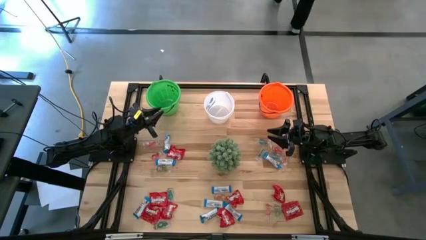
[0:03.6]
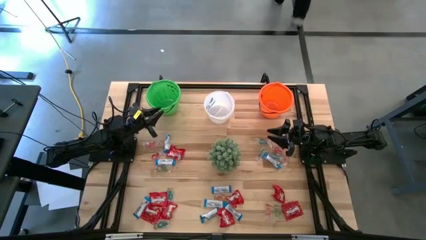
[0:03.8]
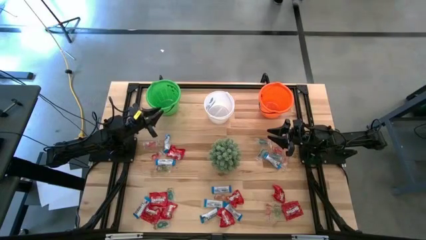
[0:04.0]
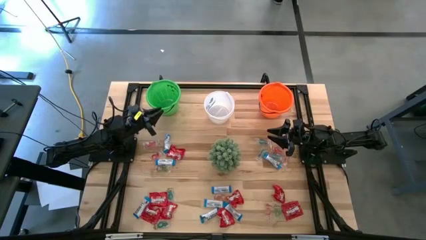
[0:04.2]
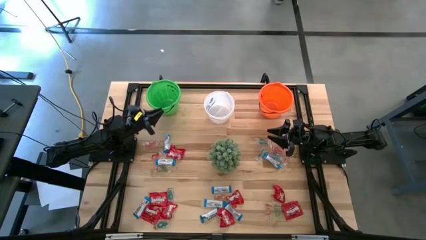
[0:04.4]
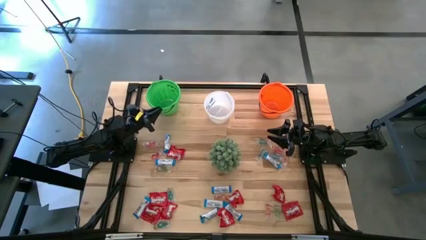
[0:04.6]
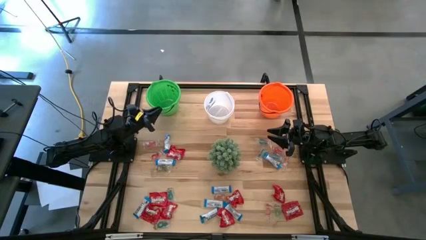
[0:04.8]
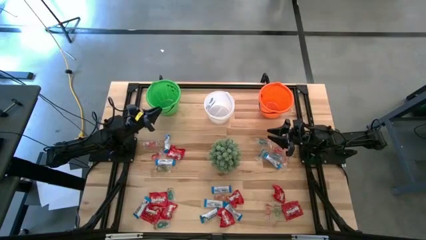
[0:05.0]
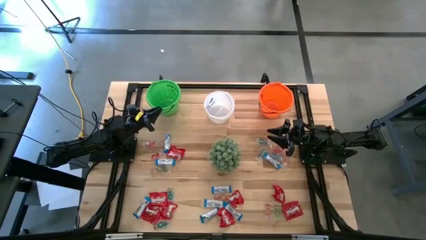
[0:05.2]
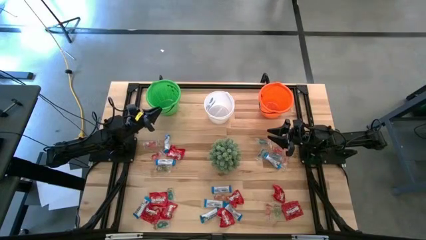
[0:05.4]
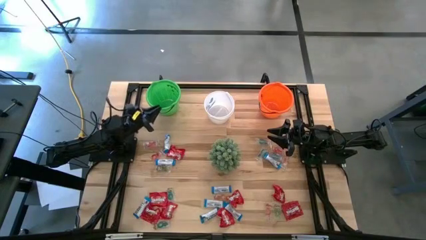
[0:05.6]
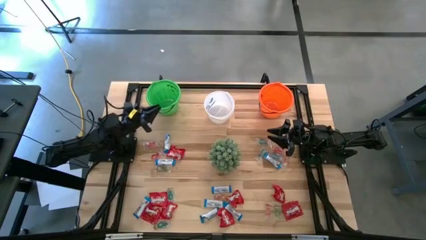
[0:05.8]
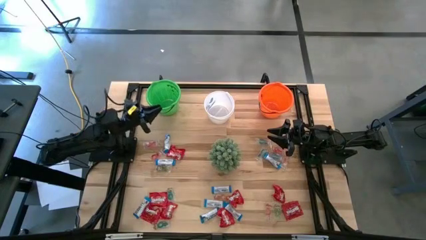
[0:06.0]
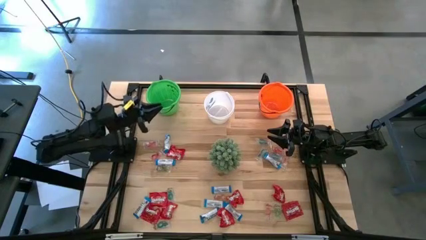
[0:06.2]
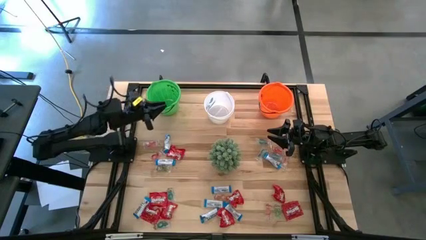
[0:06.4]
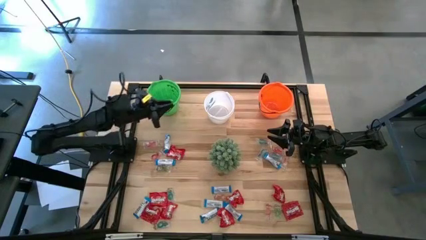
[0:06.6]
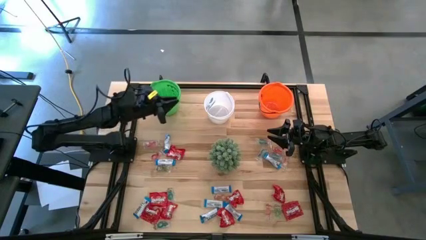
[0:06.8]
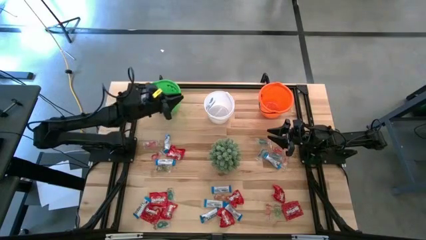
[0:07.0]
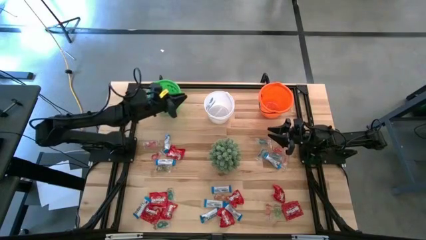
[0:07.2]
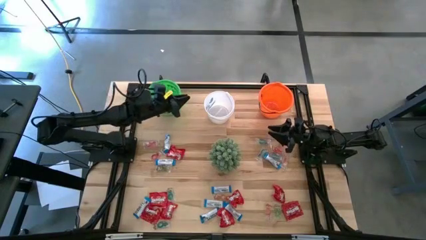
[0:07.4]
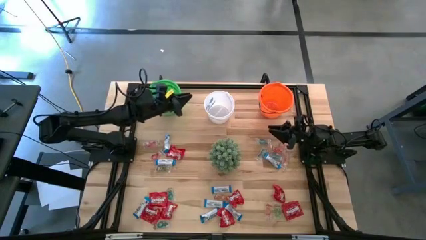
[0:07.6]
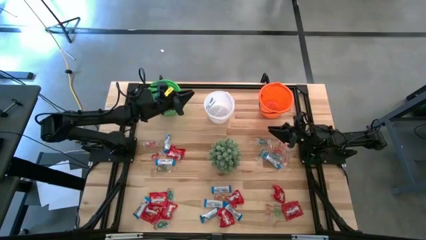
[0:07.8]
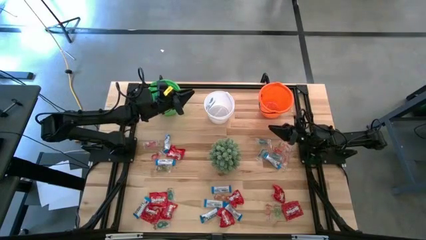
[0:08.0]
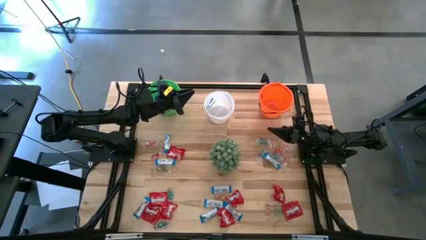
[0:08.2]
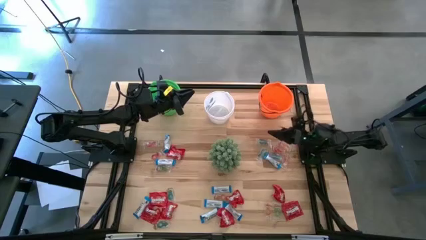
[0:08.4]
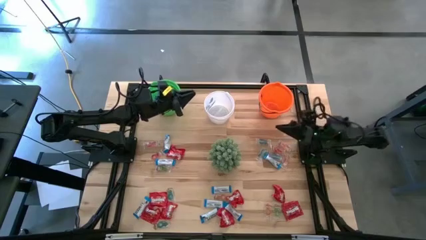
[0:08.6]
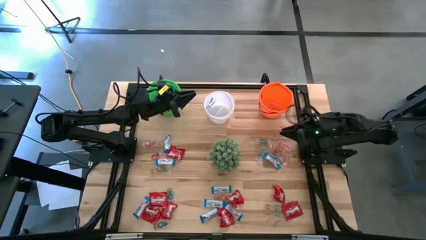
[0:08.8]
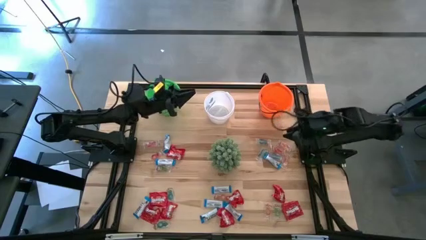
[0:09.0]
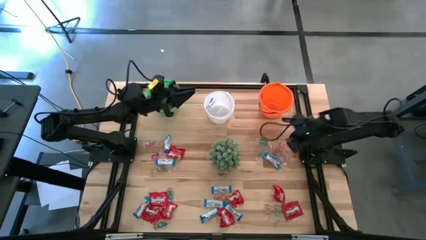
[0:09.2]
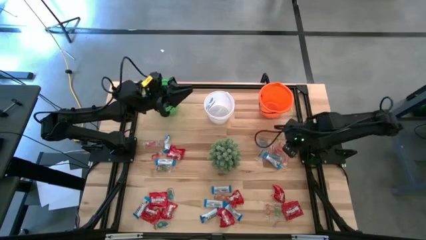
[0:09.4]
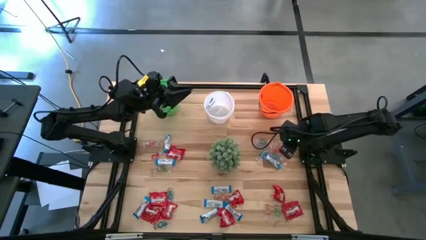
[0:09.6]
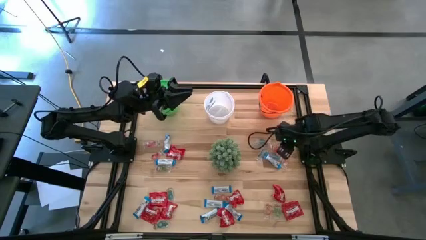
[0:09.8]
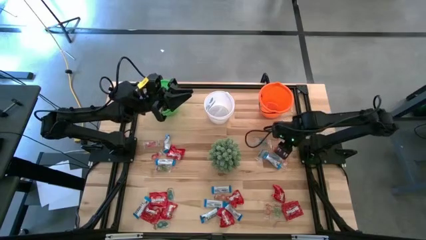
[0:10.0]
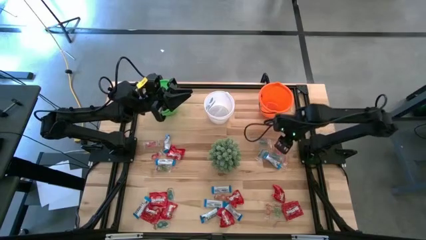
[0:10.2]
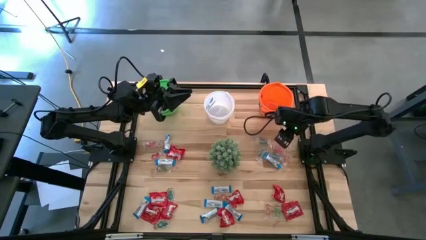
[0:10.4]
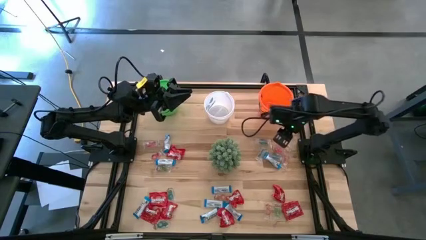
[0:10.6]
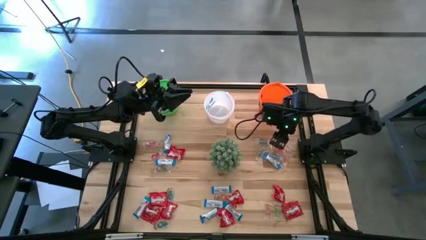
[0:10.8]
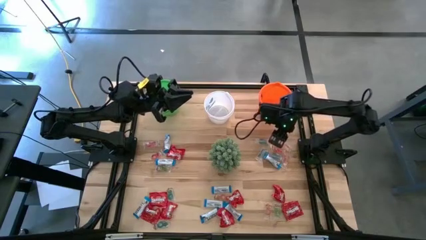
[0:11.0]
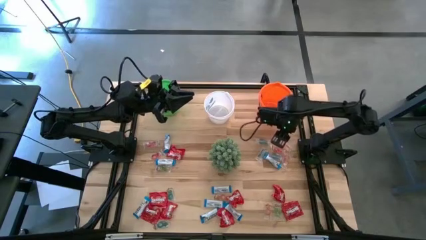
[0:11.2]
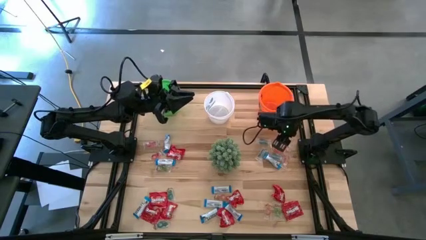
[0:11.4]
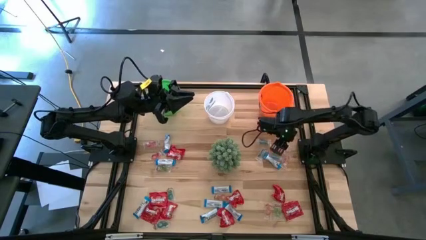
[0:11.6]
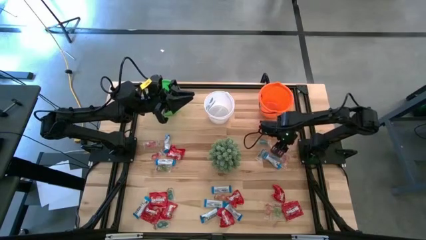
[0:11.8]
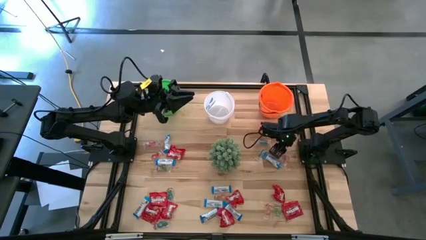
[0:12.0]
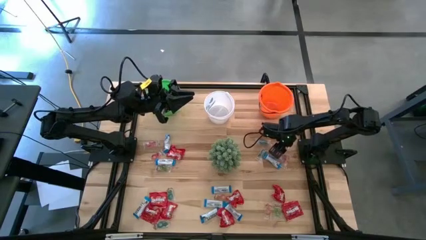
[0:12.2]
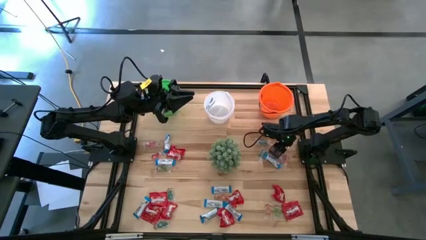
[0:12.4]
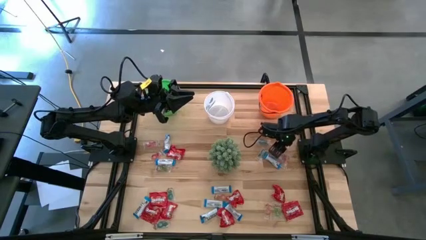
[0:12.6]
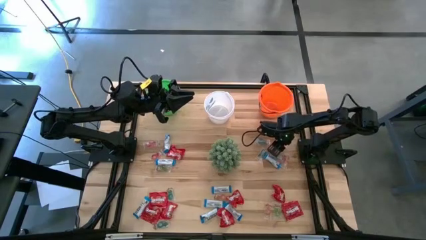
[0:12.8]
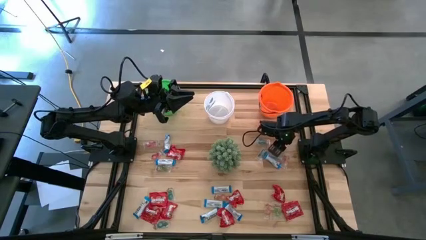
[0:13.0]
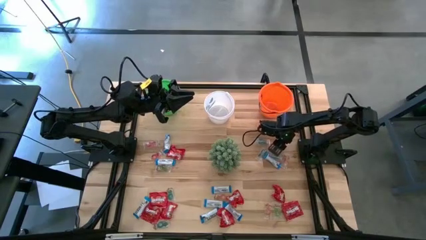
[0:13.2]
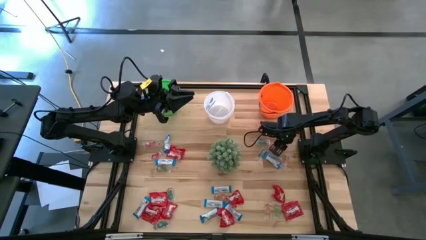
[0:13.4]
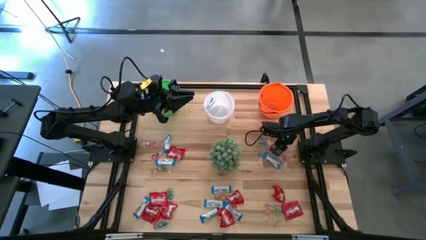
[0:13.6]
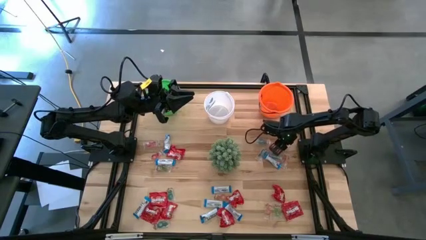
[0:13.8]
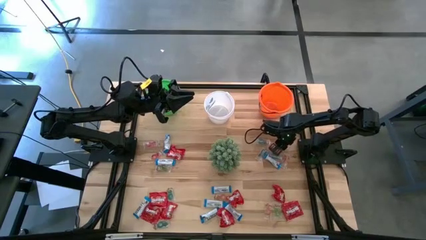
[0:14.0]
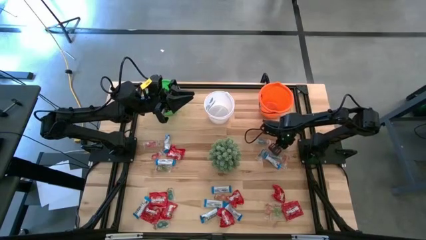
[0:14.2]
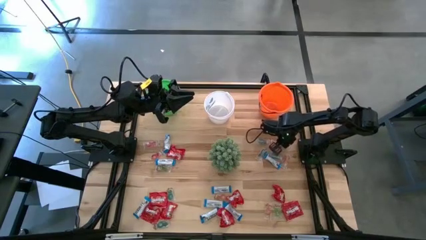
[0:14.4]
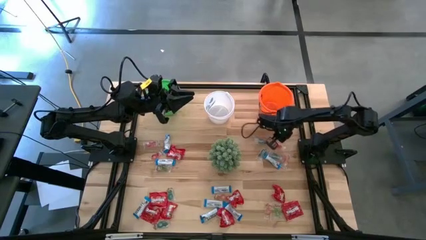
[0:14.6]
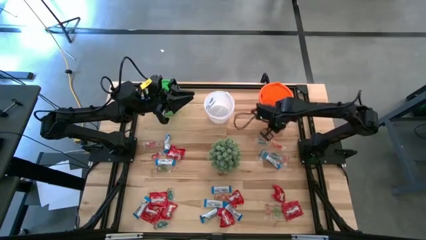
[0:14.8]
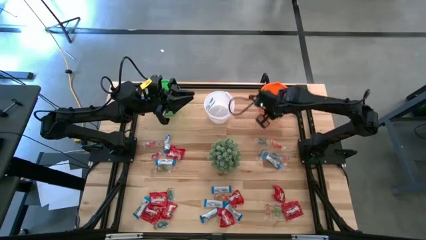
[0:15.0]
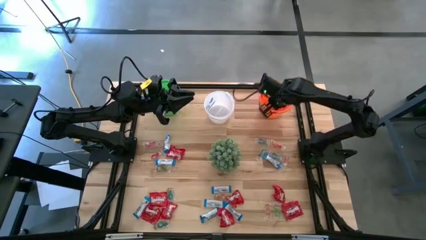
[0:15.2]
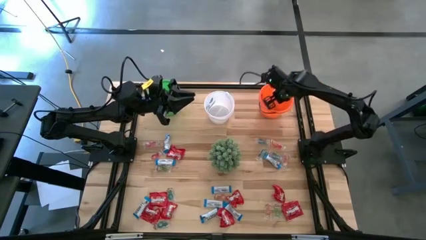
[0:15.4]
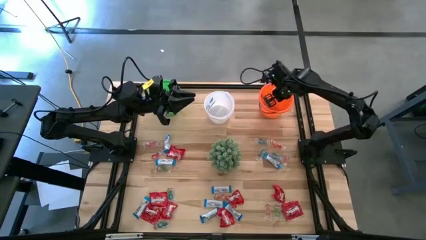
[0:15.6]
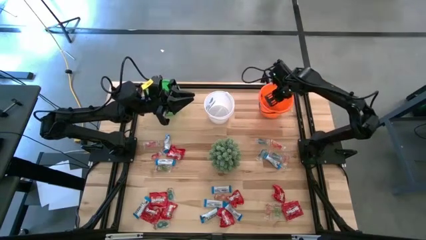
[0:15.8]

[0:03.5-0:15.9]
Task: Sort candy
Put the transparent candy into the orange bucket

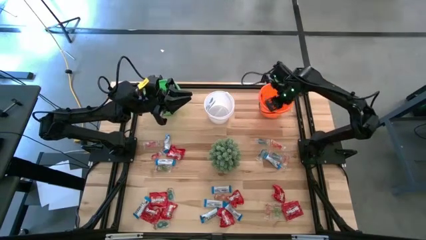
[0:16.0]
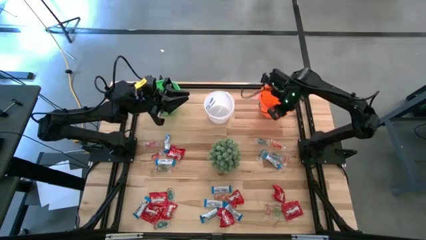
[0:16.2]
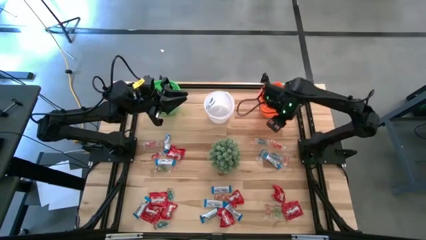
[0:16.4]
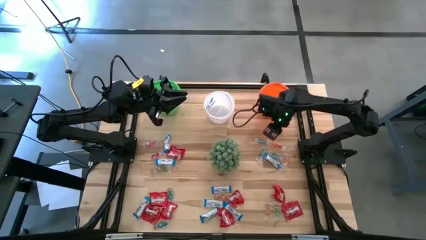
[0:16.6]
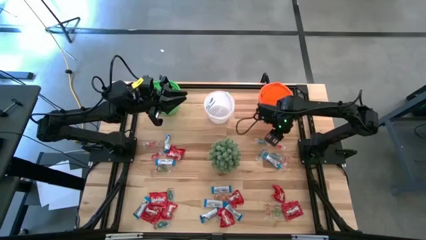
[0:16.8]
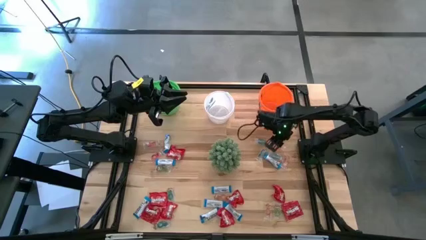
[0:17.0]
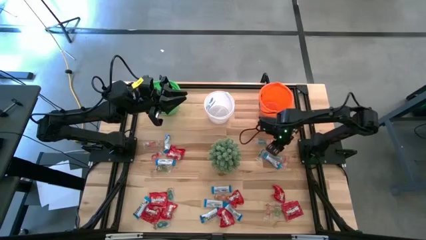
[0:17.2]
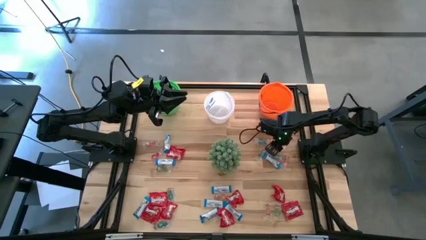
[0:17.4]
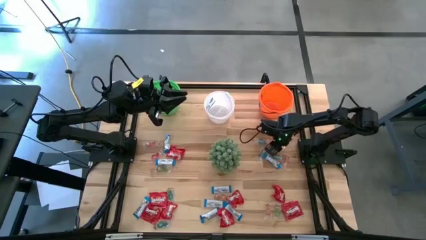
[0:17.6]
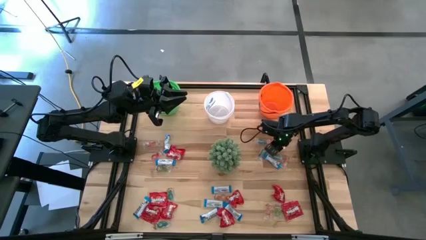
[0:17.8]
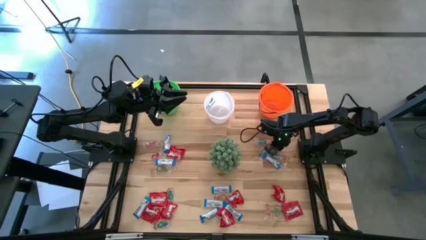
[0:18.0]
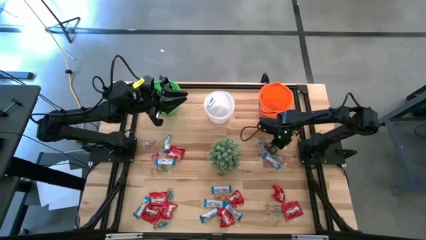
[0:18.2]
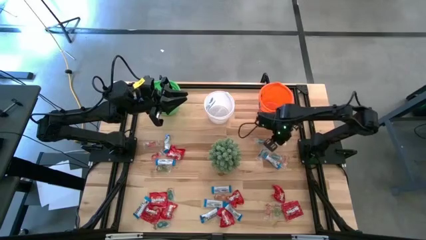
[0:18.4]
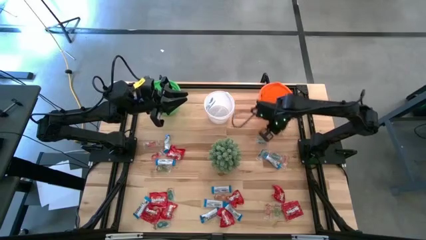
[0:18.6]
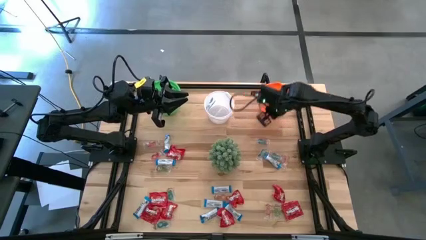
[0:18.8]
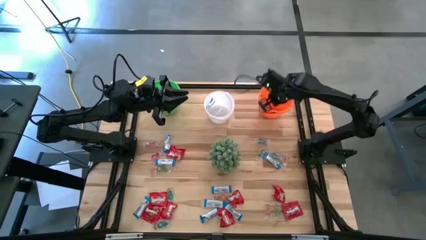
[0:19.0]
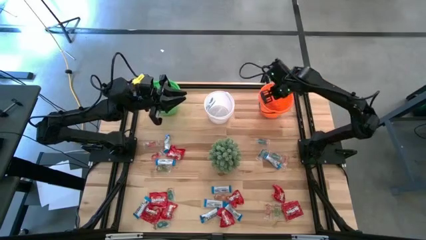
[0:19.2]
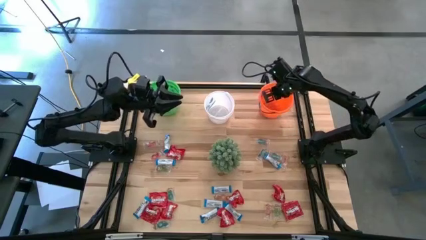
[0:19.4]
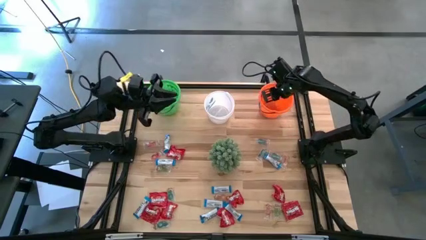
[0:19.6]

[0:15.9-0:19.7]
Put the transparent candy into the orange bucket
